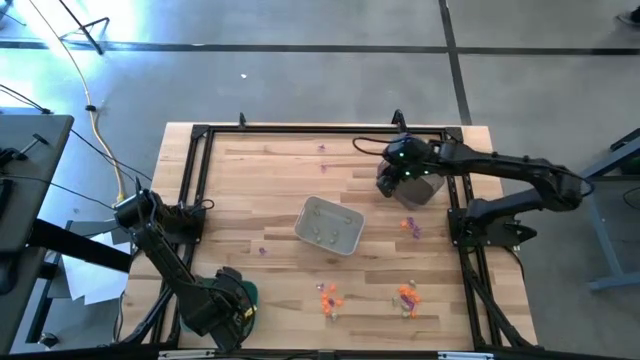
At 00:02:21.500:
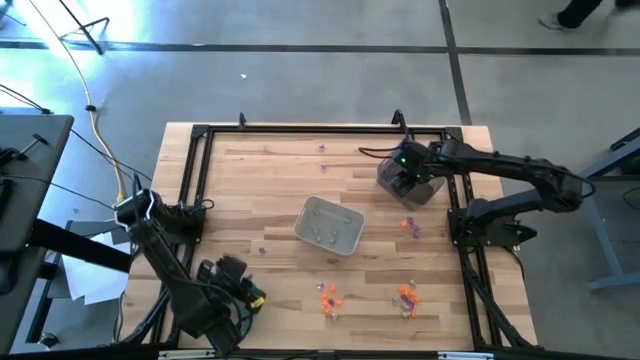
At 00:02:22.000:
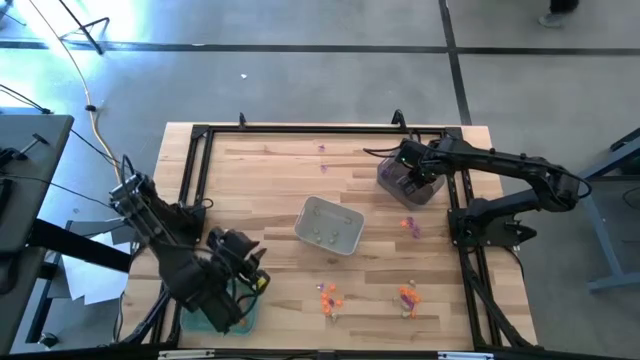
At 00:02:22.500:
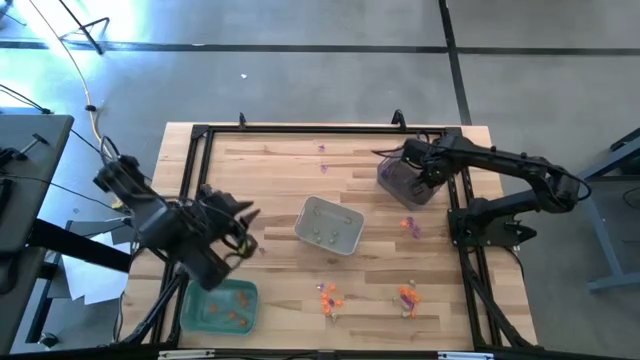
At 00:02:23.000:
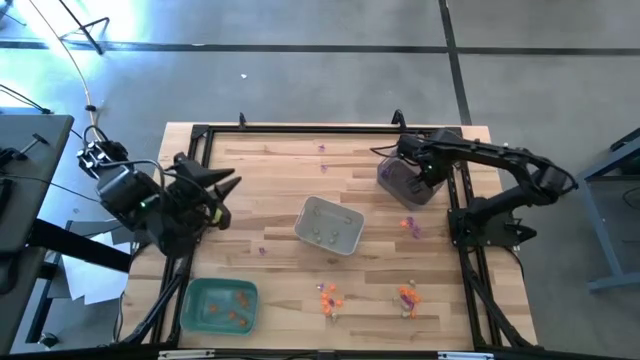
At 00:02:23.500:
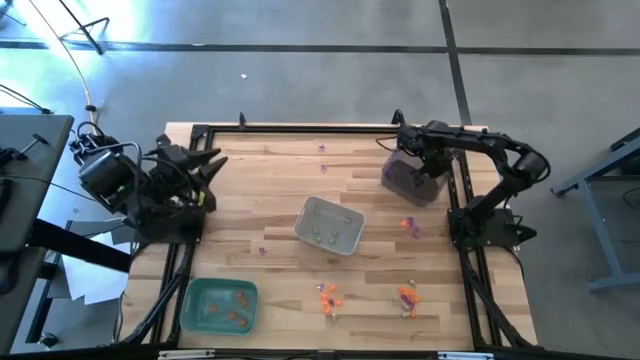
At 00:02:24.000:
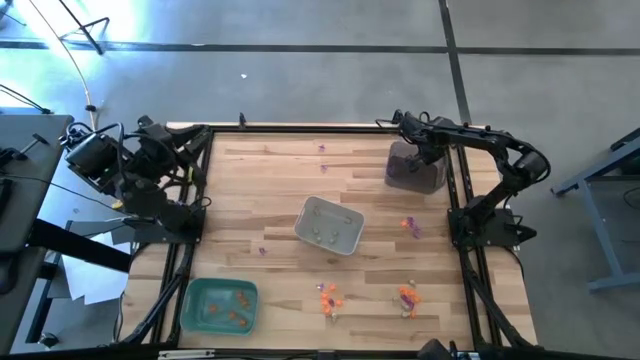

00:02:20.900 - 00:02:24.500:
Task: Sort Halloween decoration
Adjust the black bin

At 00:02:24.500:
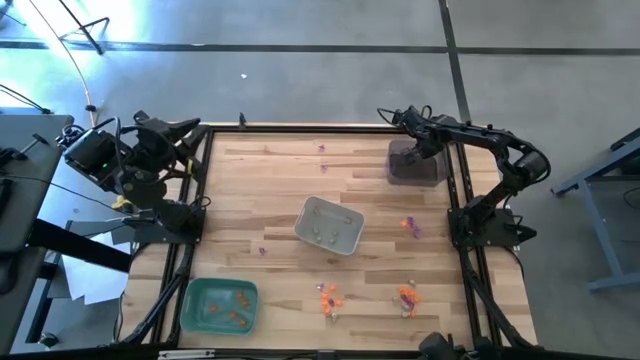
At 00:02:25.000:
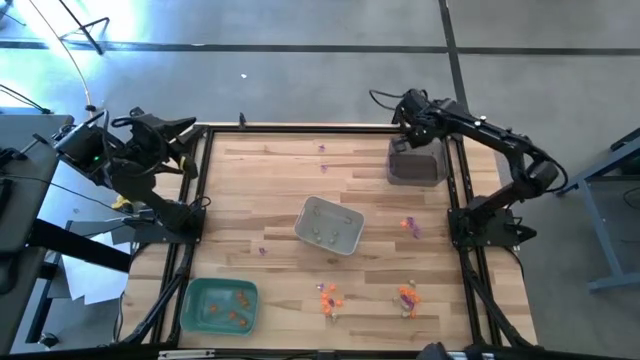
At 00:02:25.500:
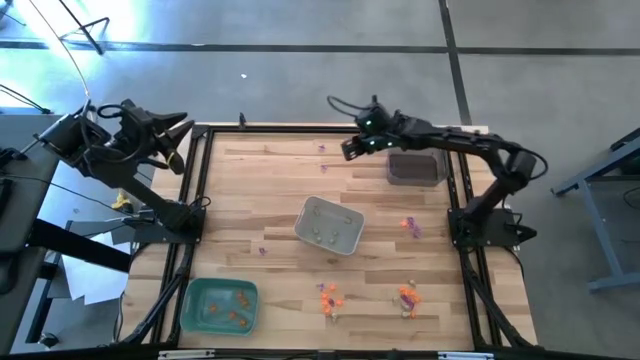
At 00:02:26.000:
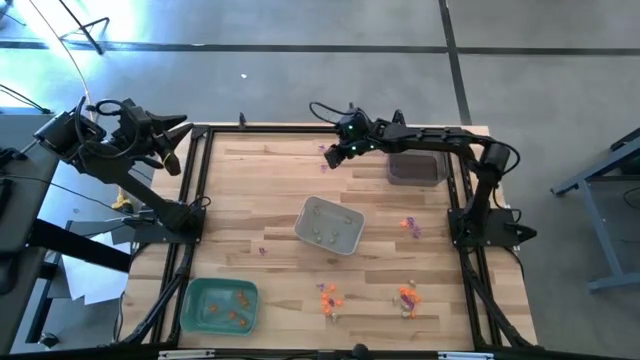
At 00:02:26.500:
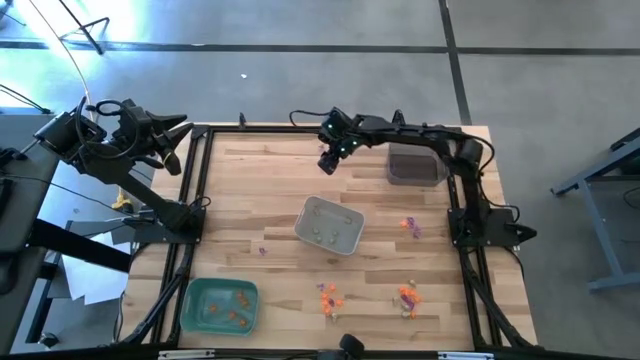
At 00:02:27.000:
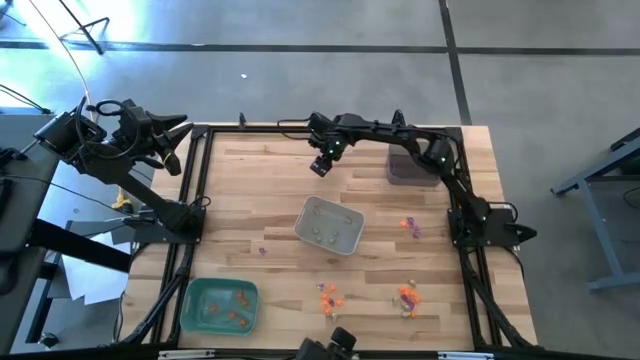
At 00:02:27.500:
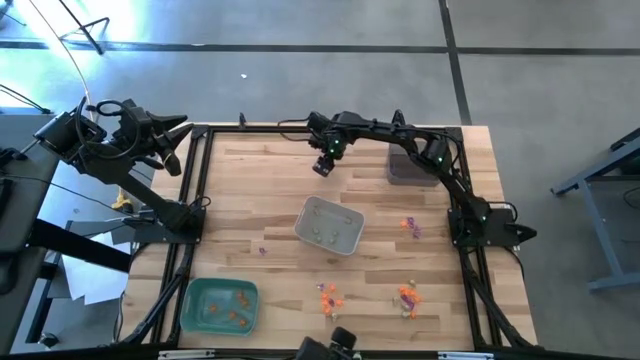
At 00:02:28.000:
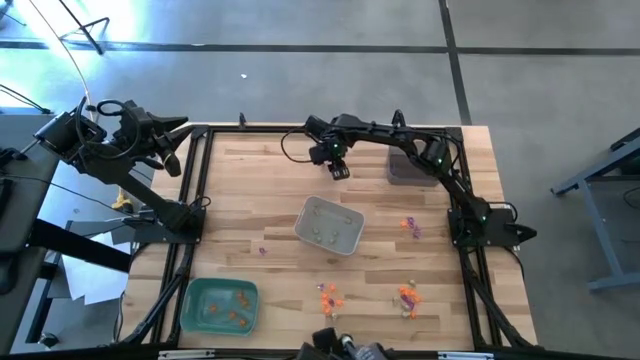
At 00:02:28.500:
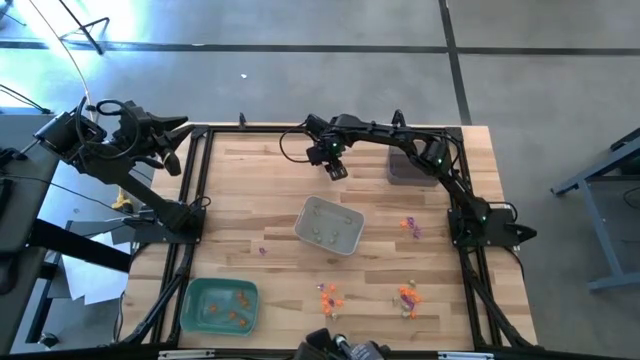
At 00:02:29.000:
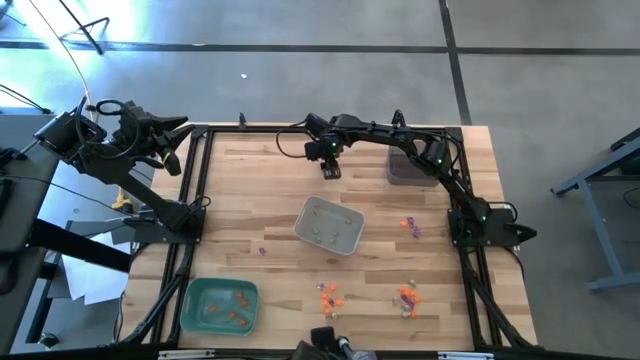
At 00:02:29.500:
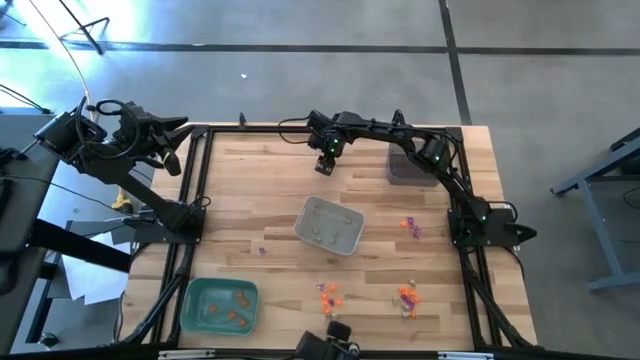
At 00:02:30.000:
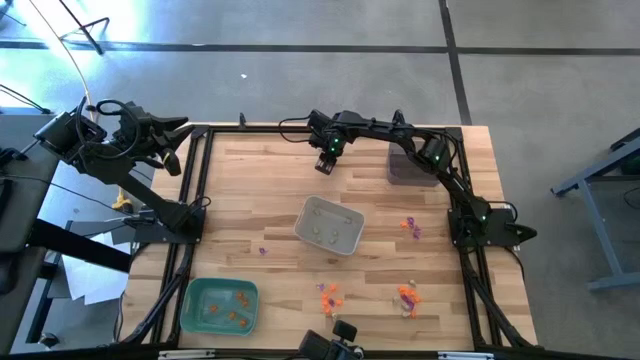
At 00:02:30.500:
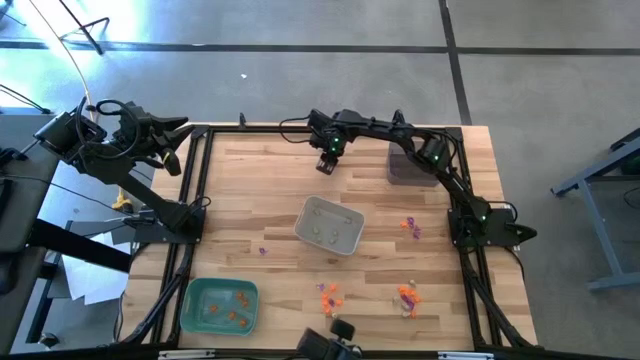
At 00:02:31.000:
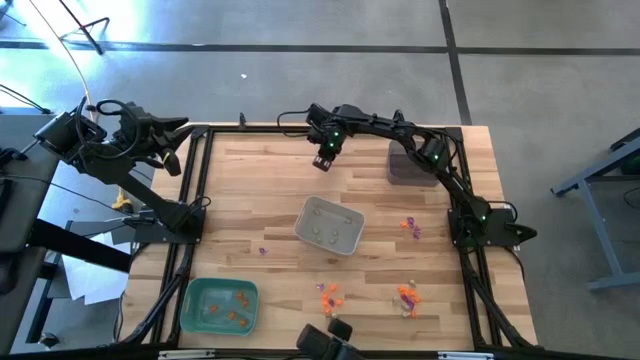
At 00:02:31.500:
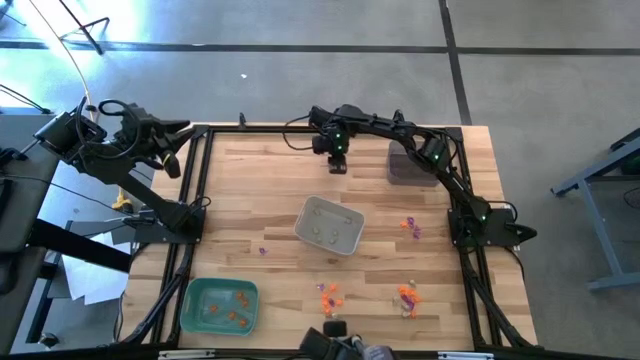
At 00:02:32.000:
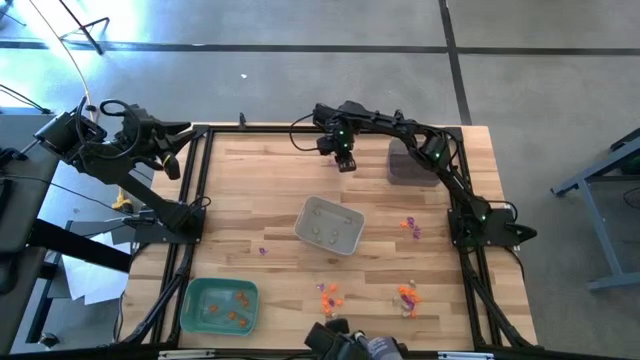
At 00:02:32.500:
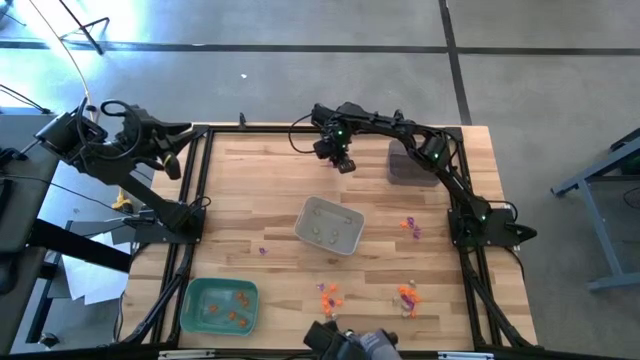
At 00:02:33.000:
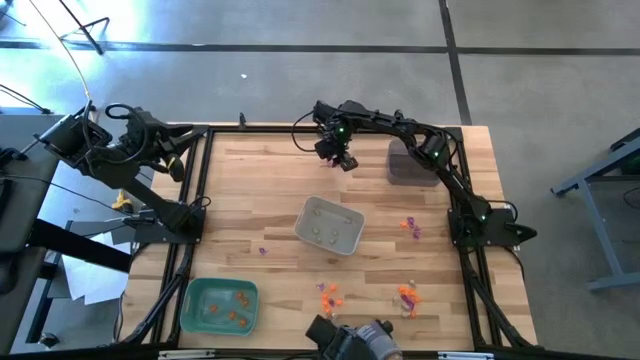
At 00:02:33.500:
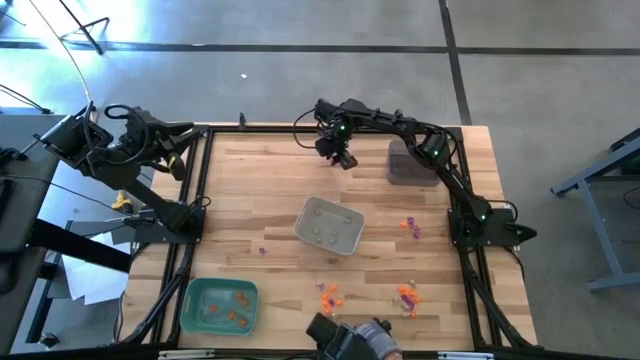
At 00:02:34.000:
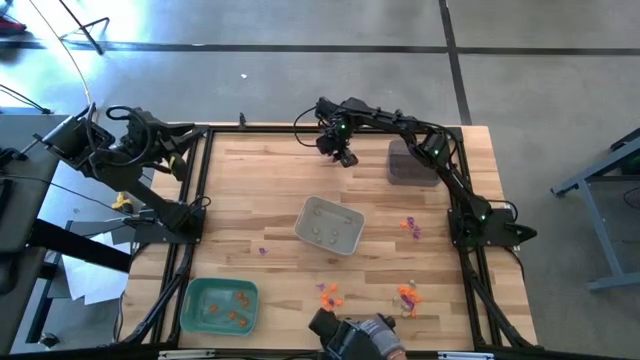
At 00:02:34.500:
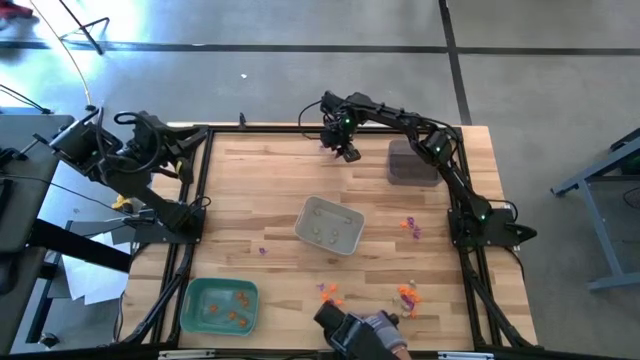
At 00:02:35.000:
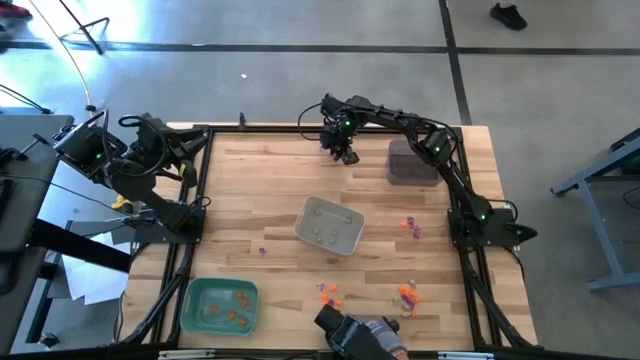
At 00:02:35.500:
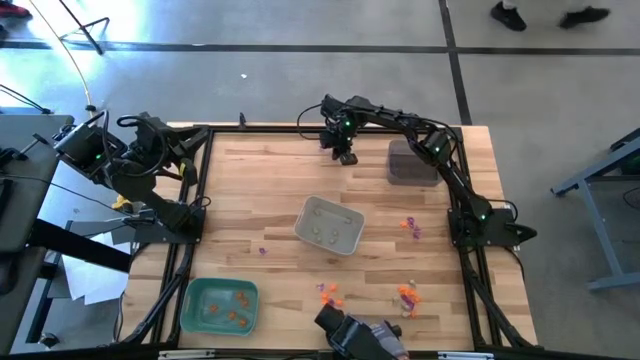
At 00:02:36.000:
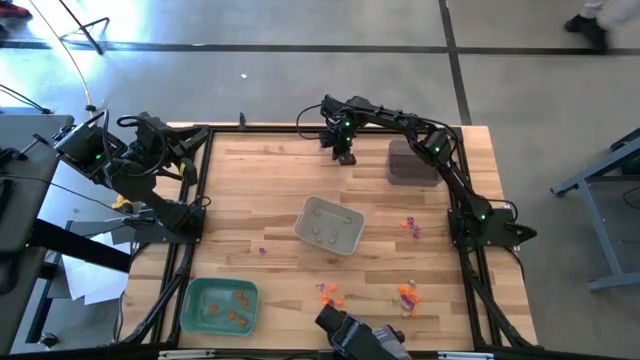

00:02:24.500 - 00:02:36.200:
Put the violet witch hat toy into the black bin

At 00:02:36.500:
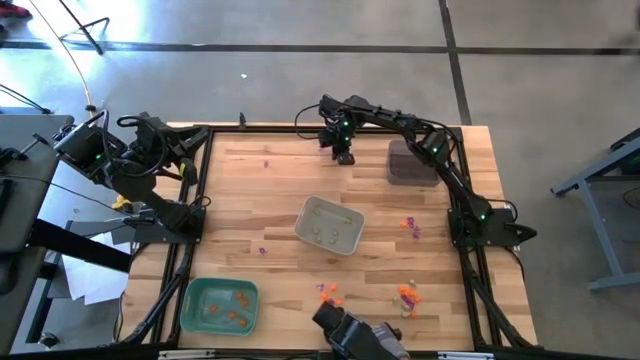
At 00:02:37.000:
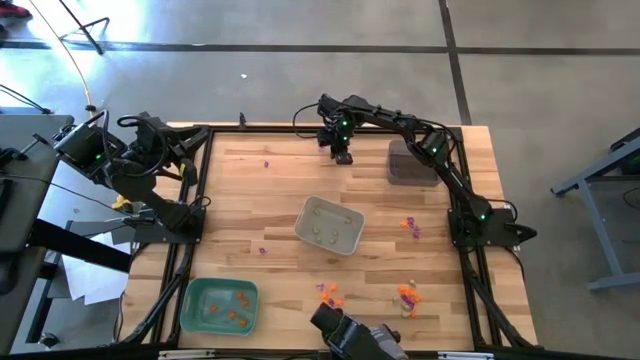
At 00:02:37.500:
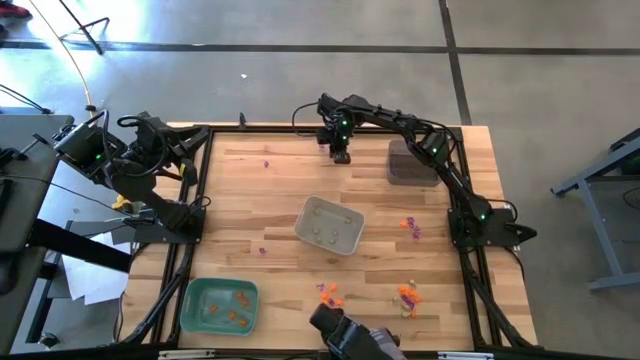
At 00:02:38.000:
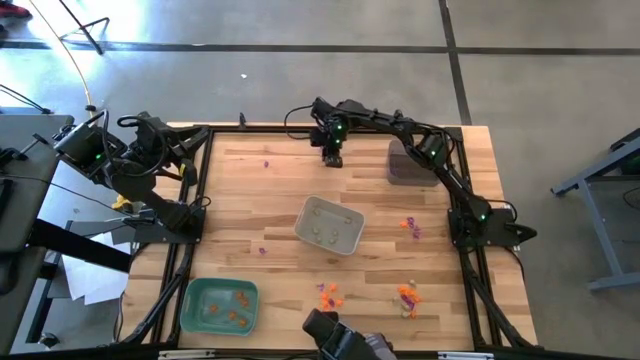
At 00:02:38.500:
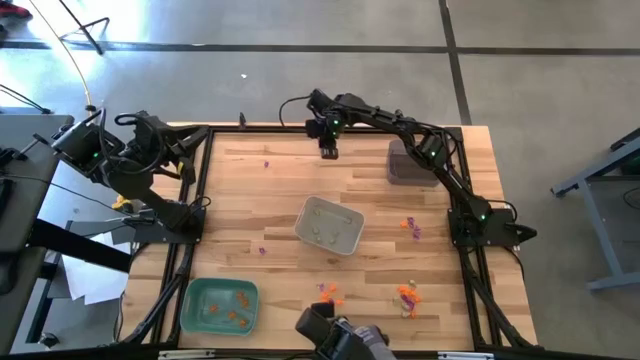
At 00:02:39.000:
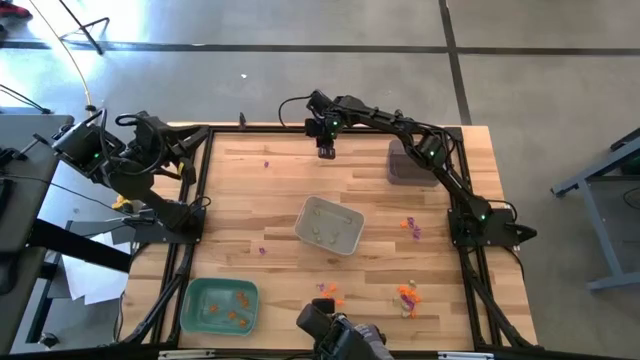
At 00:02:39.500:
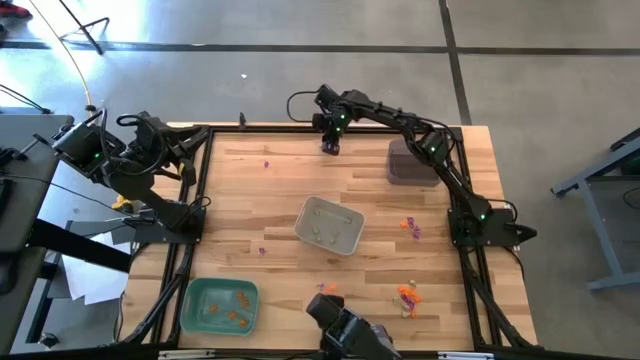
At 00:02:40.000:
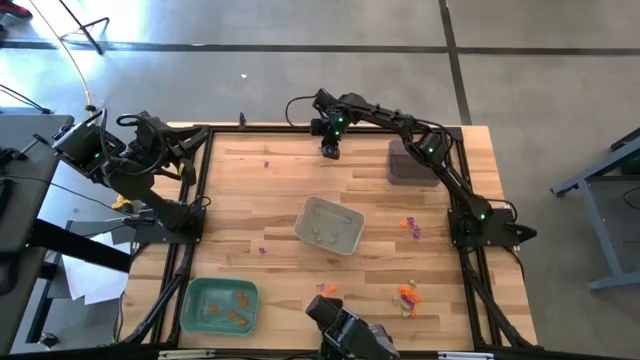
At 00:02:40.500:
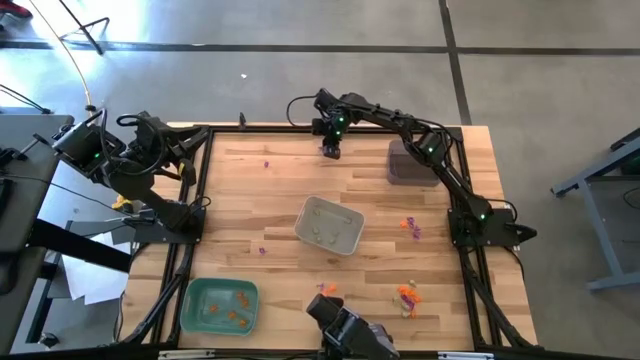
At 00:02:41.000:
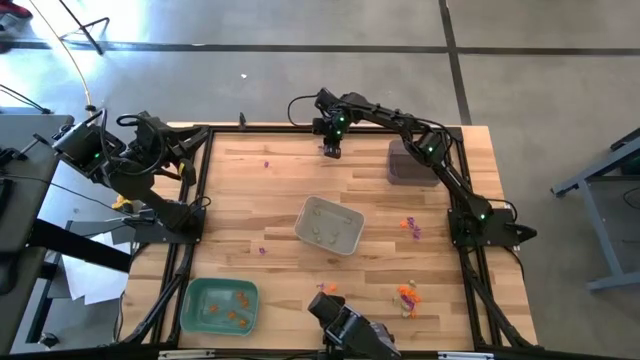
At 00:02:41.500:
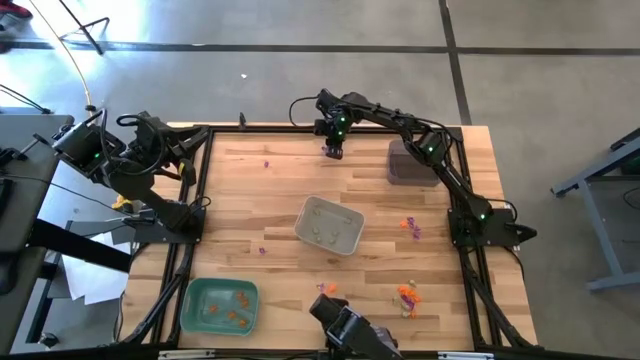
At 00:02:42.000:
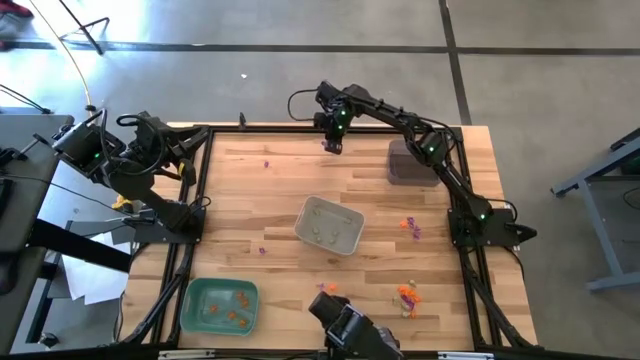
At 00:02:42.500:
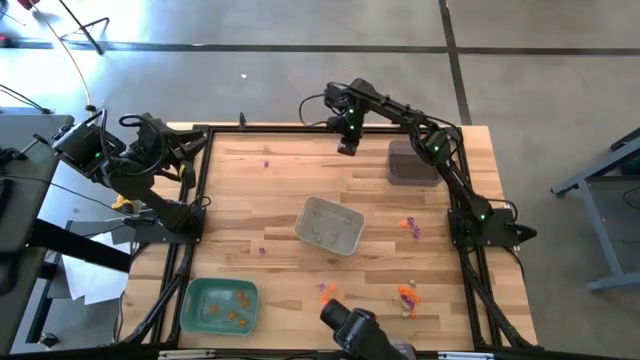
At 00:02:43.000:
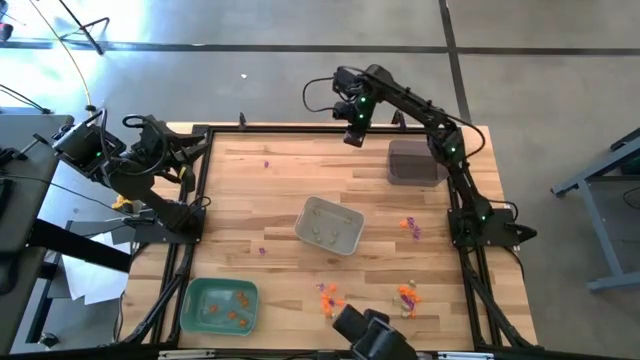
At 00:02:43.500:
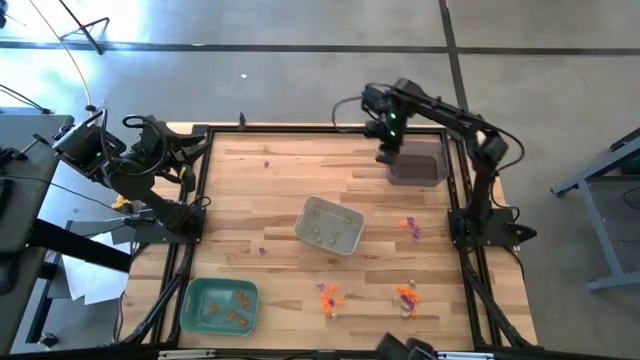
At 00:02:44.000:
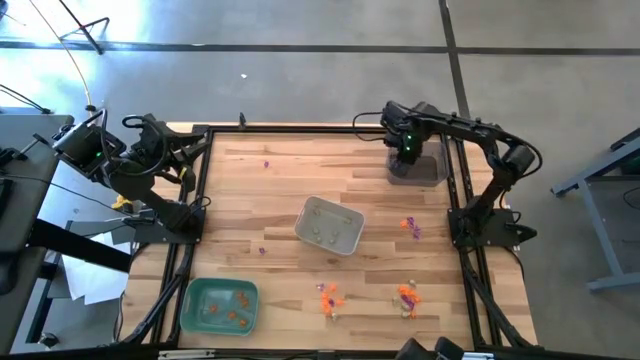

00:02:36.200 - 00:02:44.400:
Put the violet witch hat toy into the black bin
